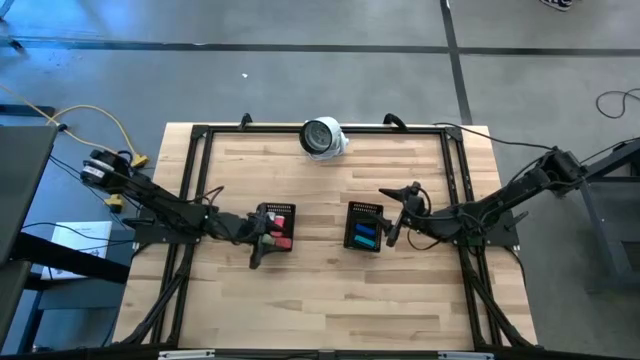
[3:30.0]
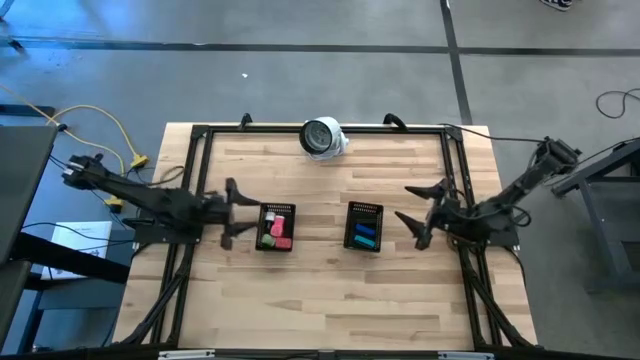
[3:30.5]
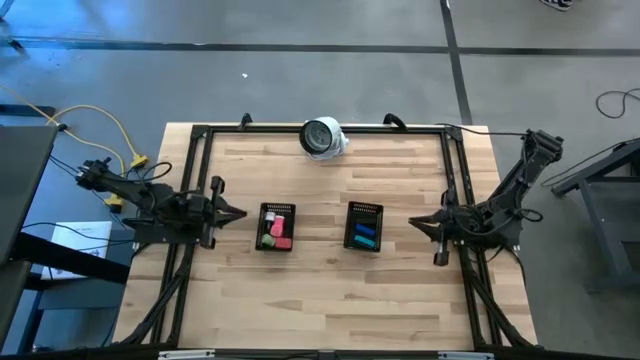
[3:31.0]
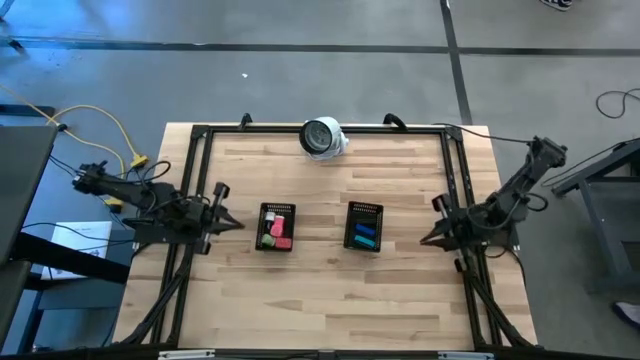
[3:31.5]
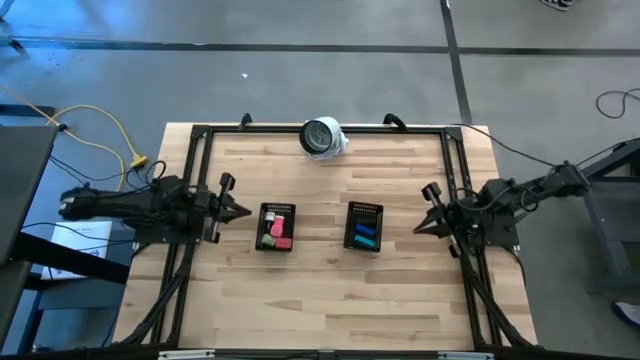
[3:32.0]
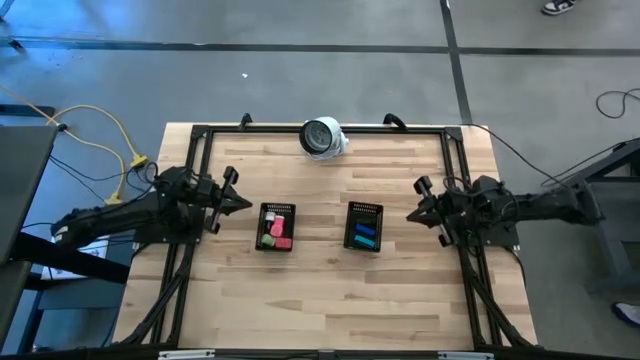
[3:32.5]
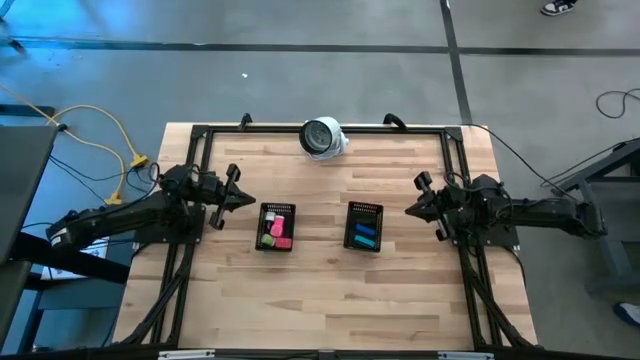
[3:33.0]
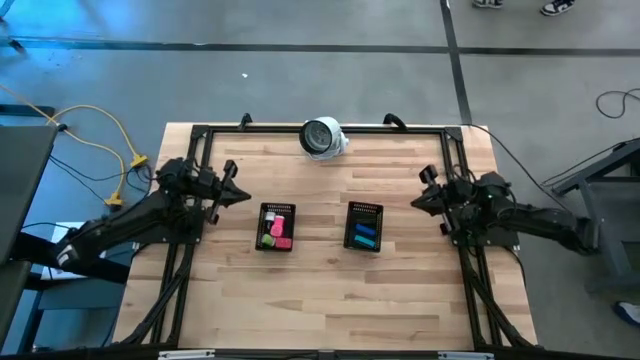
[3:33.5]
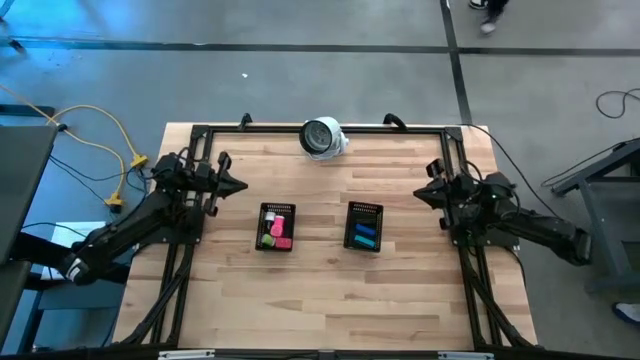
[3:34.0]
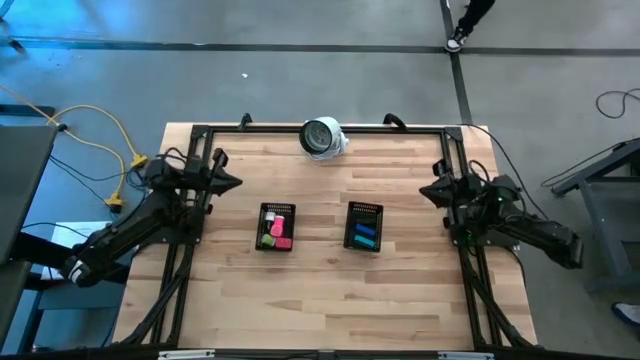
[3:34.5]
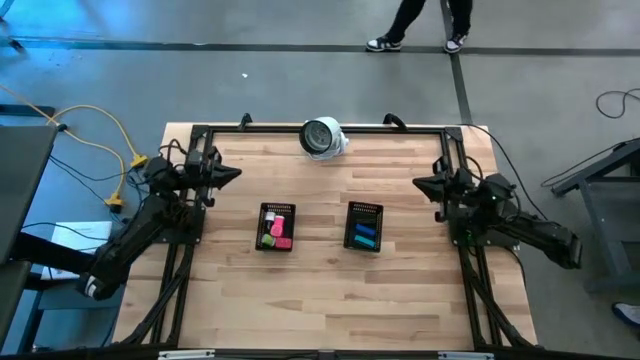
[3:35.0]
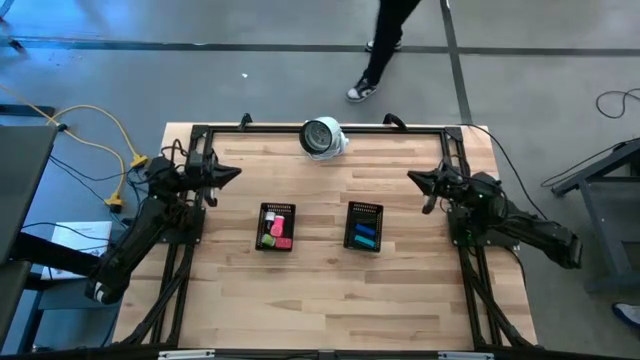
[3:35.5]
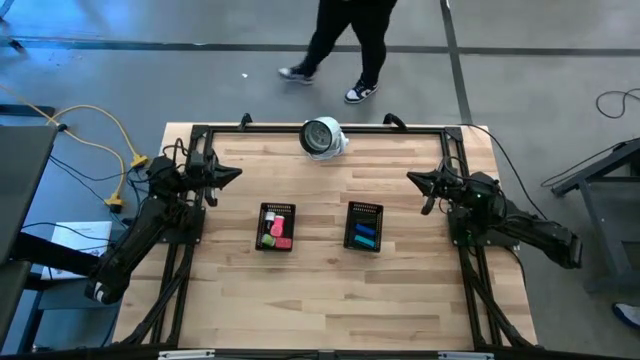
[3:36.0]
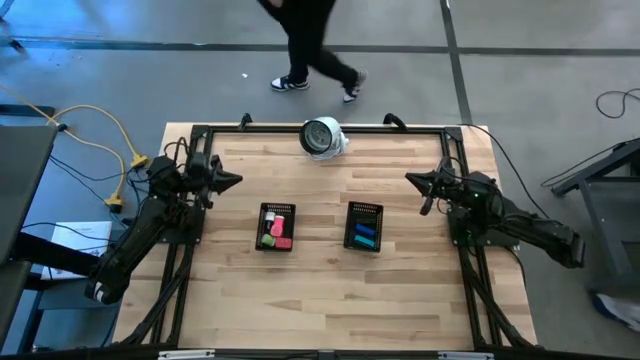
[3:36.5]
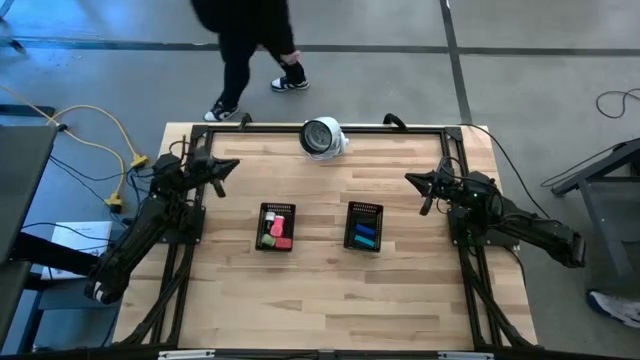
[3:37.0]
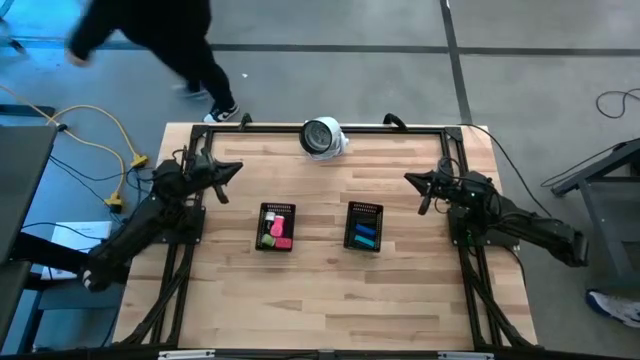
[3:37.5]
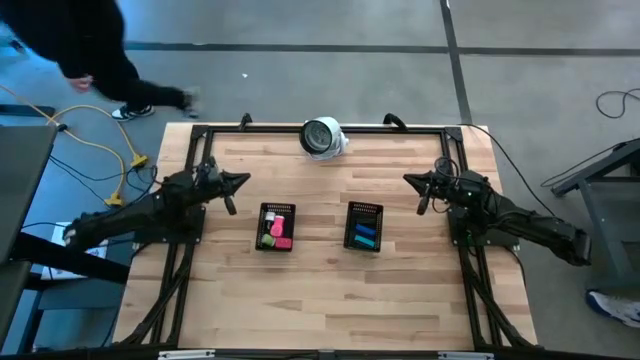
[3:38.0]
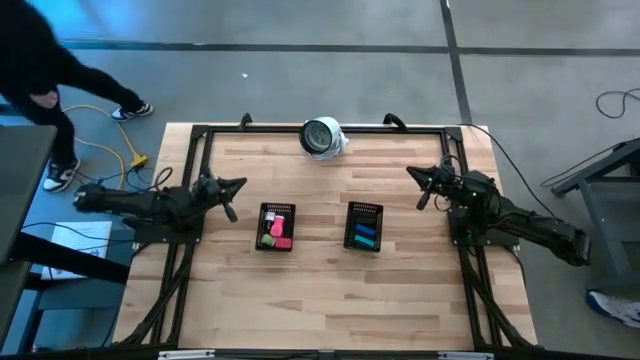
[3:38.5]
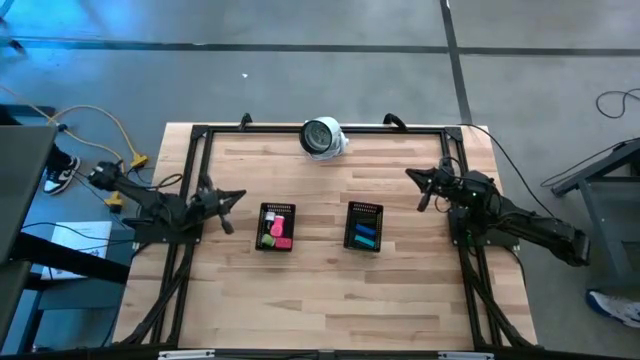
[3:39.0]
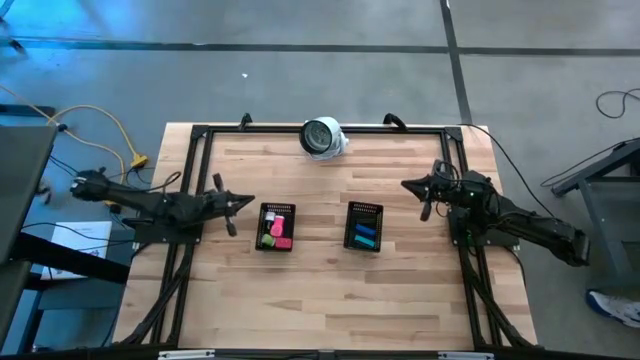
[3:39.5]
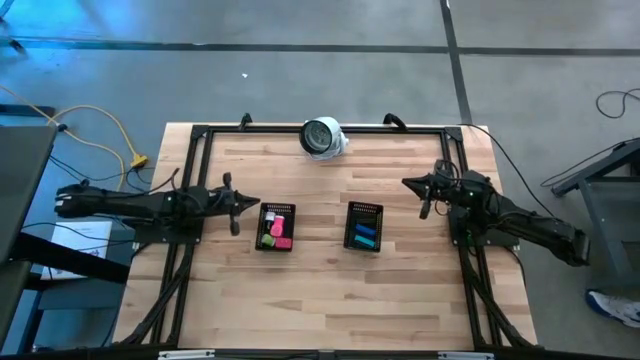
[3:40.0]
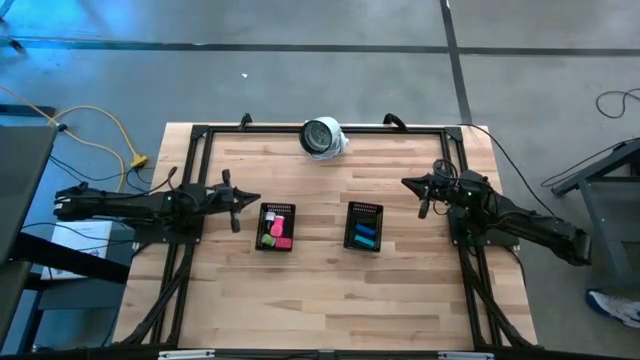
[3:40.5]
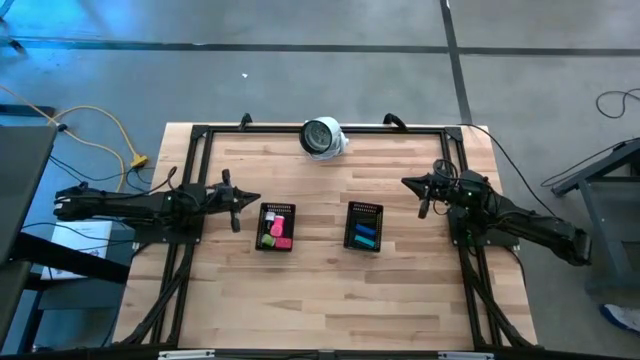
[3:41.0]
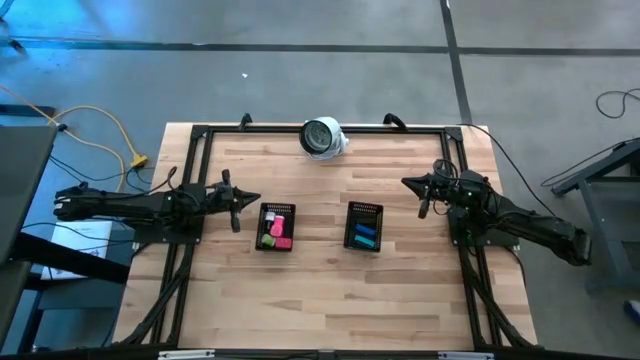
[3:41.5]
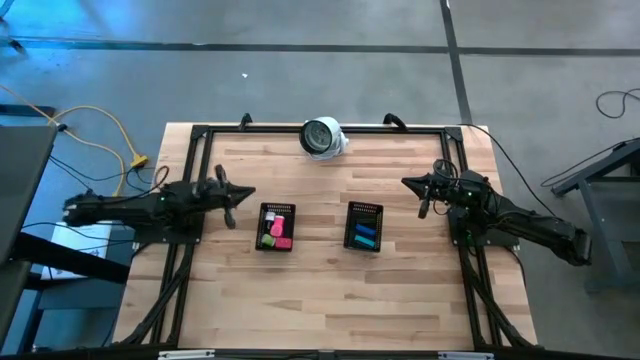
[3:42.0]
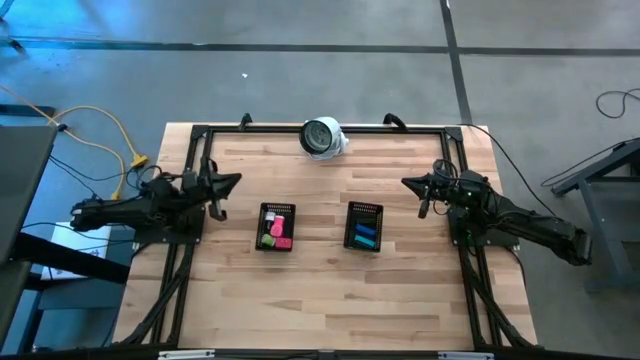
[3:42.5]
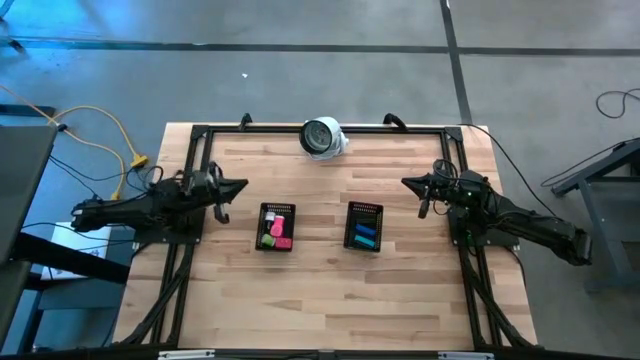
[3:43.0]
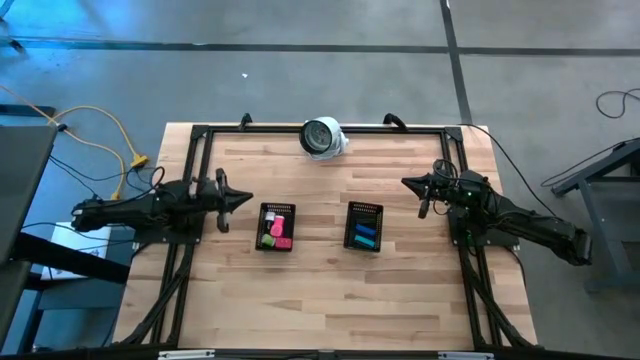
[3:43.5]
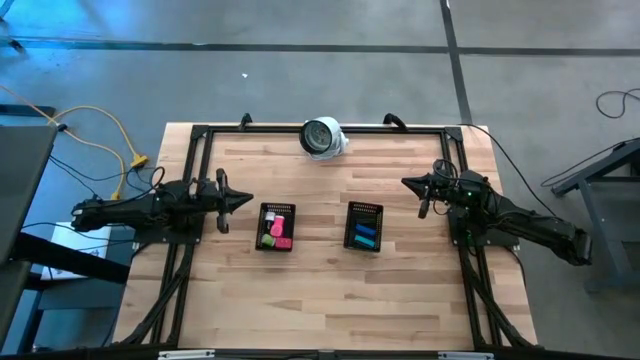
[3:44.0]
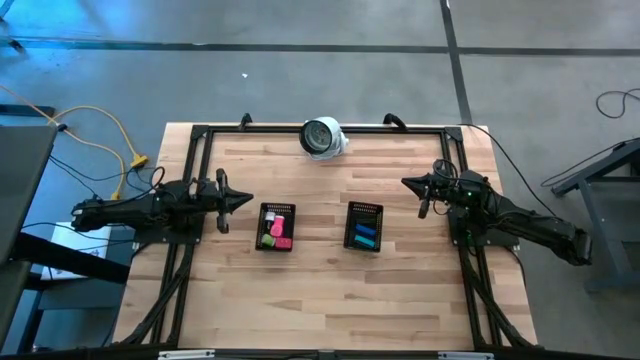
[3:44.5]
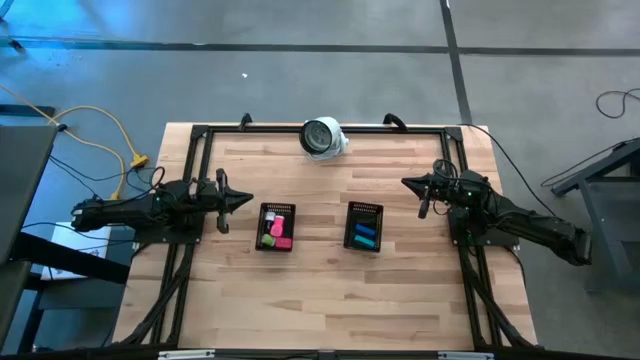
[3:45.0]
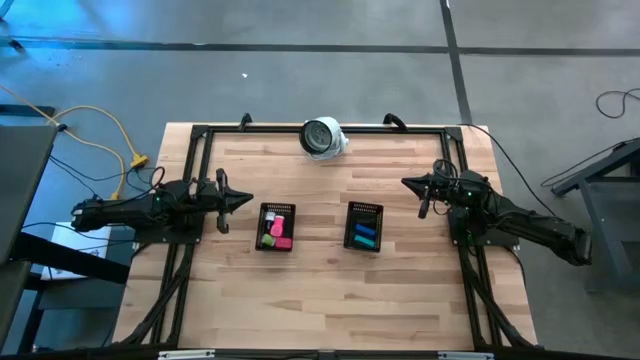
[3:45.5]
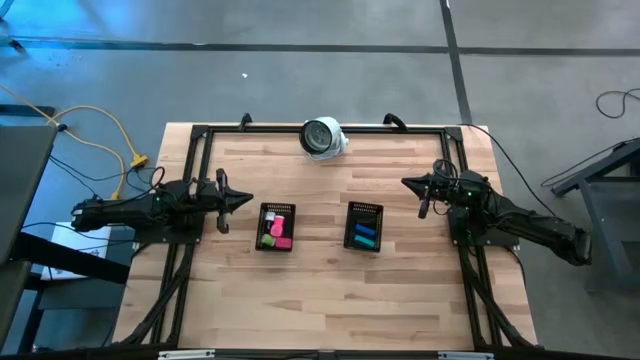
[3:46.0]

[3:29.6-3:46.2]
Task: Pick & Place Office items
Return to Home Position

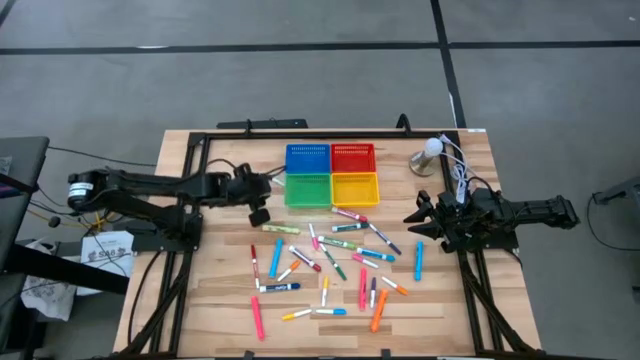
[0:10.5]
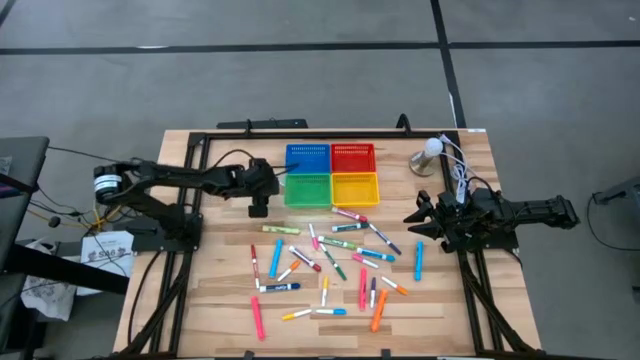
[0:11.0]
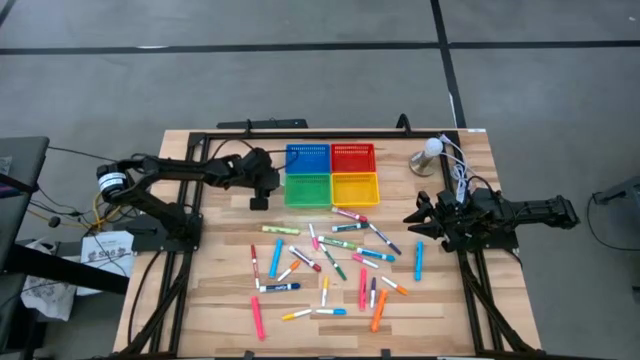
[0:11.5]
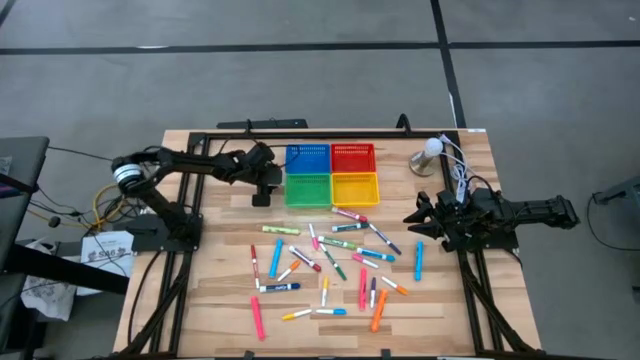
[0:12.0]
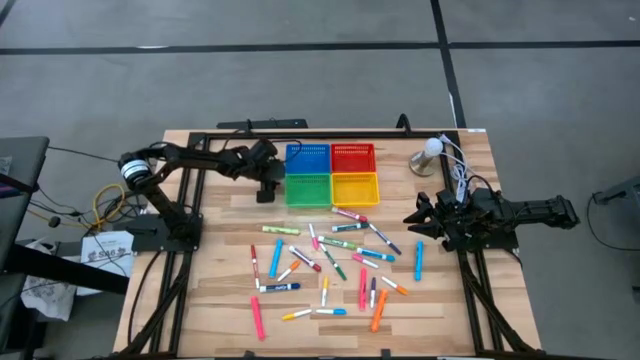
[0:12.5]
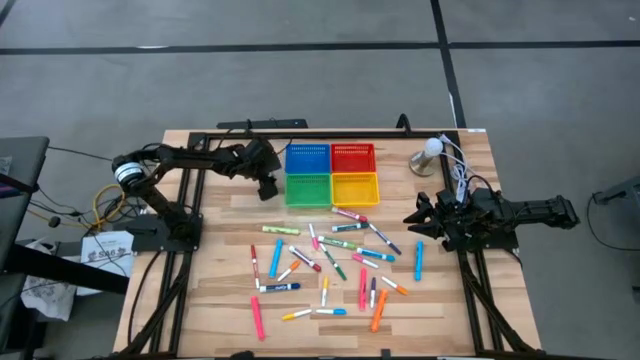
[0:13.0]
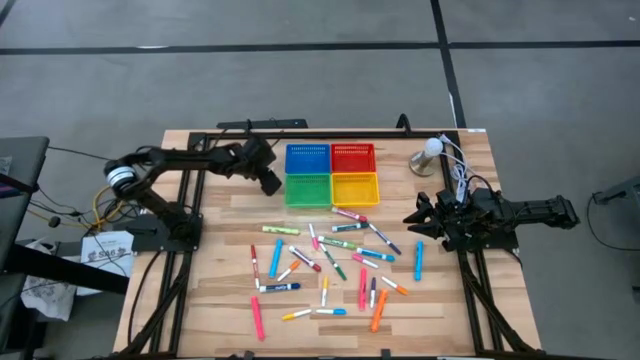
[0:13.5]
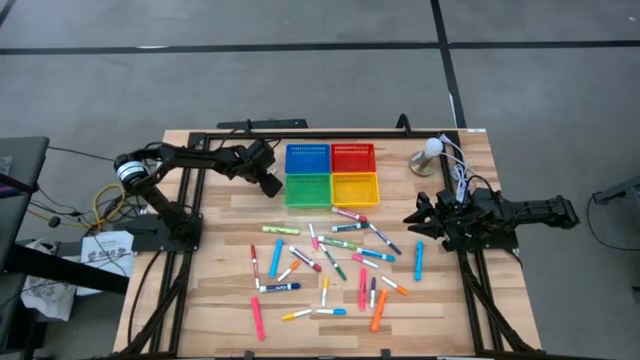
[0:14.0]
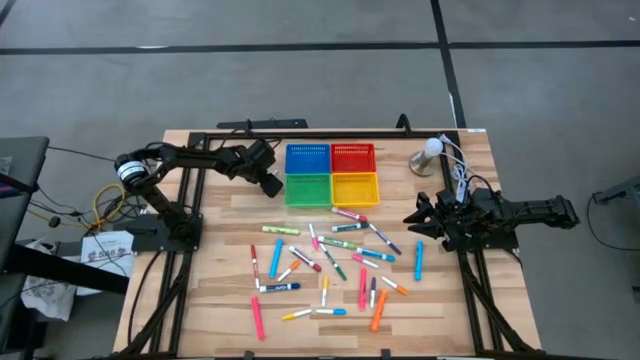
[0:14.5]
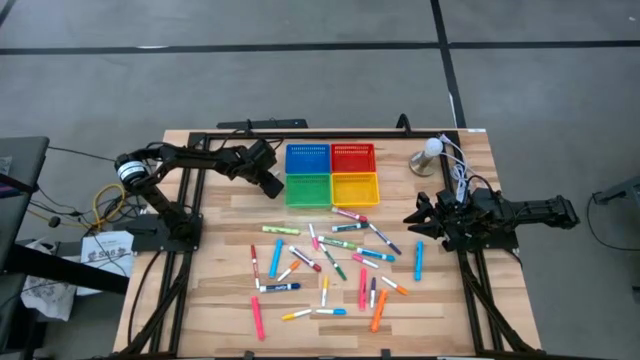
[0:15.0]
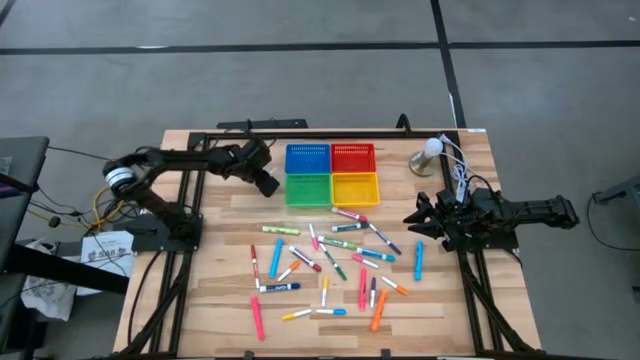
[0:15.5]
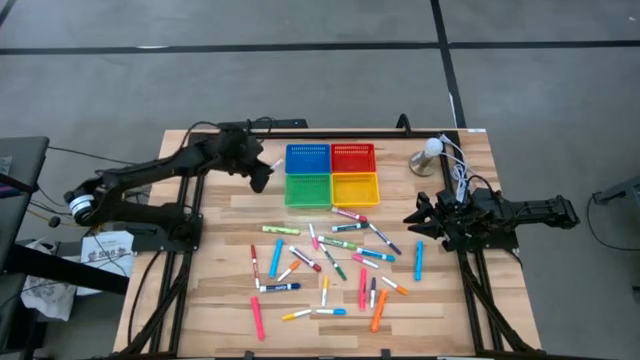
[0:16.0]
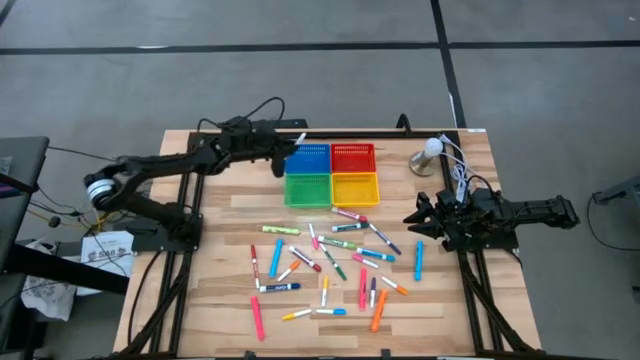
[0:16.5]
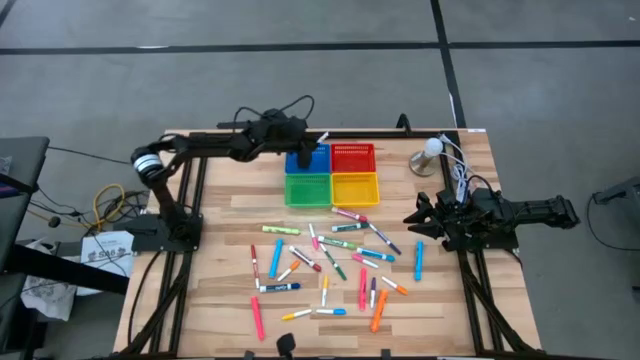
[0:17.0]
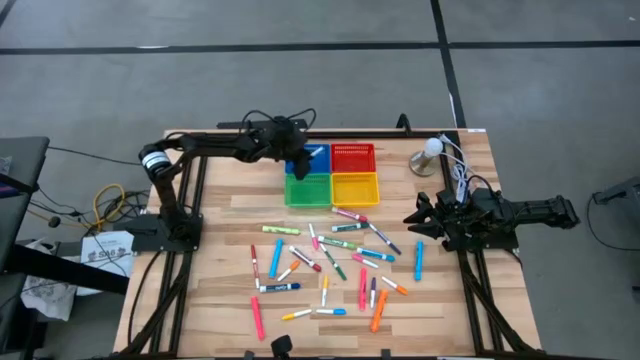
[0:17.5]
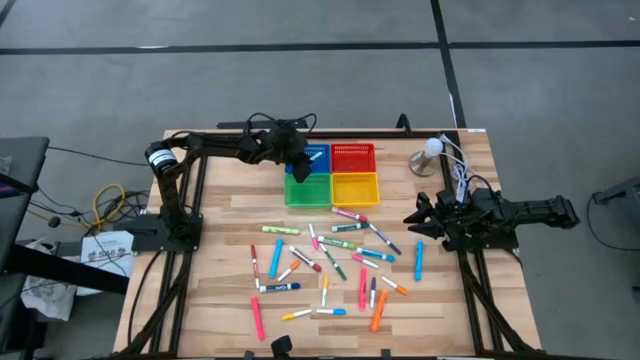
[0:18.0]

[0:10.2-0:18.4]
Task: Pick & Place Markers
Put the black small marker into the blue bin
